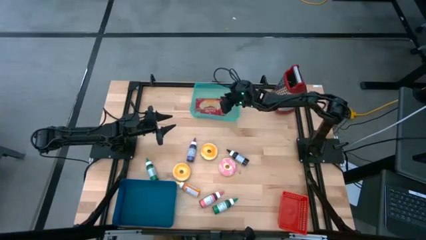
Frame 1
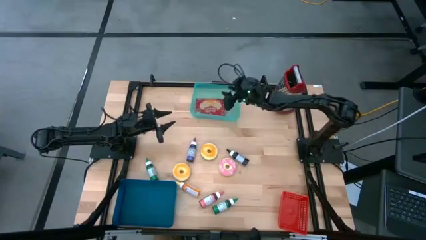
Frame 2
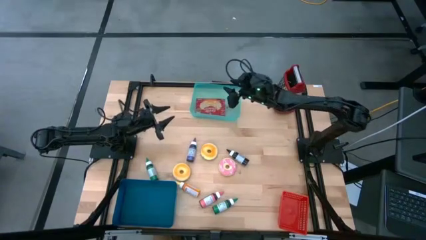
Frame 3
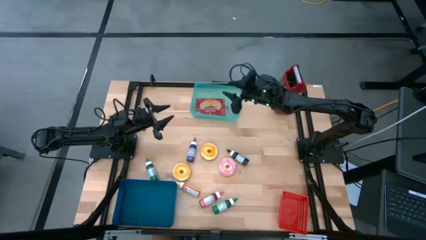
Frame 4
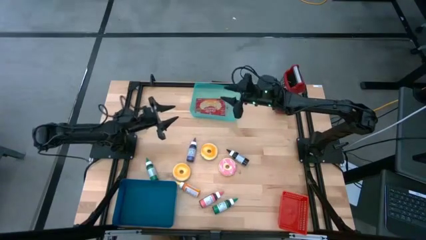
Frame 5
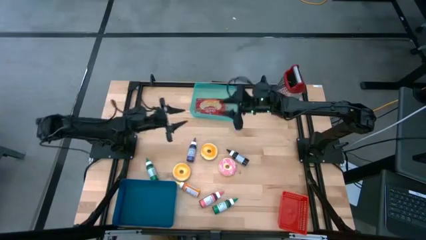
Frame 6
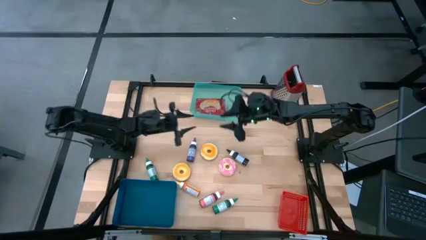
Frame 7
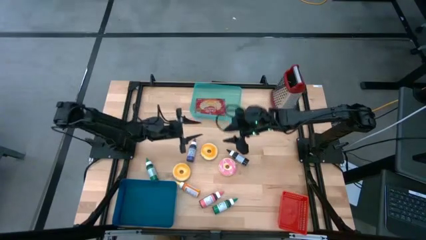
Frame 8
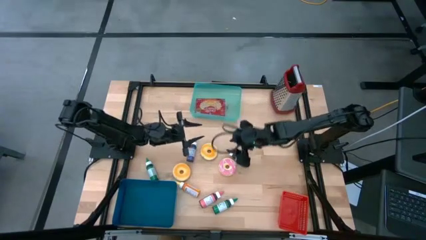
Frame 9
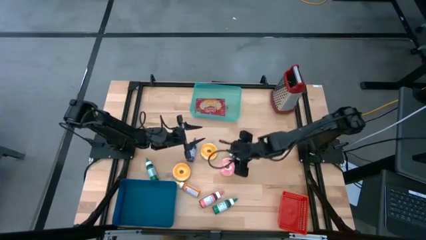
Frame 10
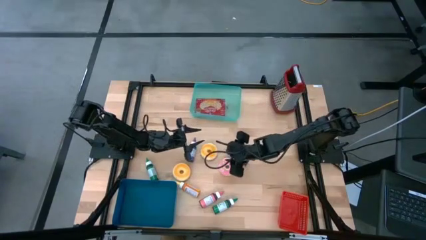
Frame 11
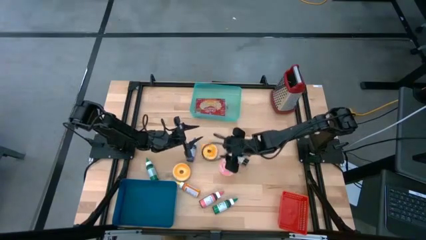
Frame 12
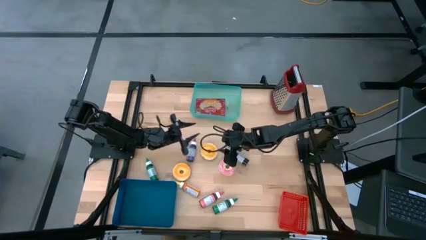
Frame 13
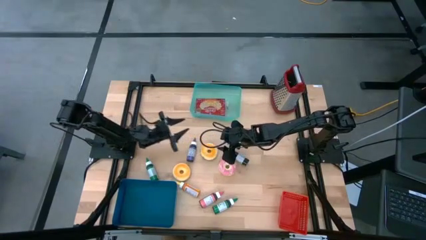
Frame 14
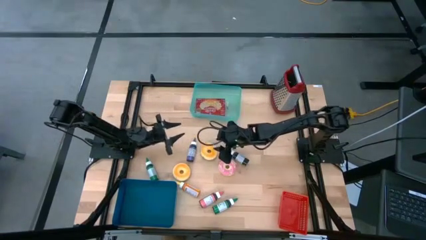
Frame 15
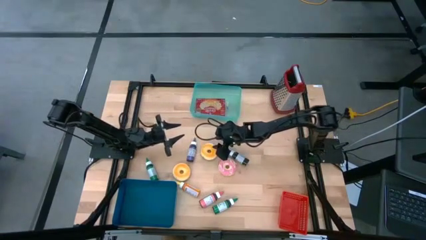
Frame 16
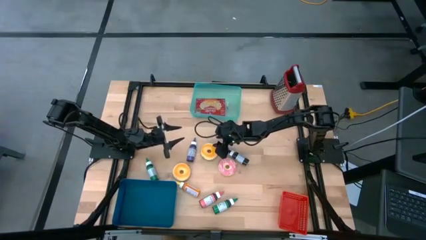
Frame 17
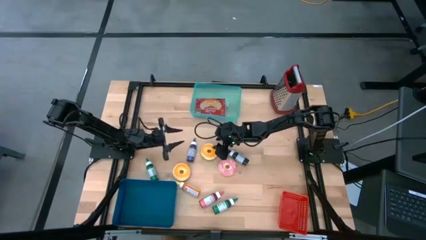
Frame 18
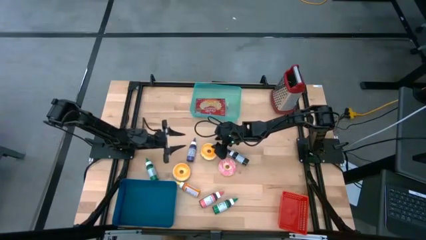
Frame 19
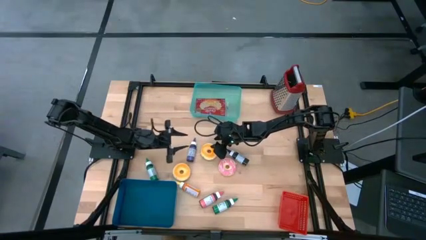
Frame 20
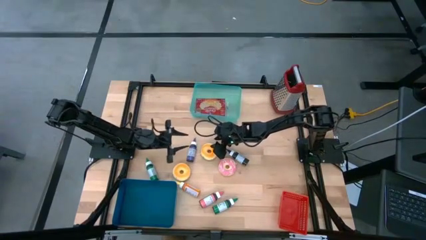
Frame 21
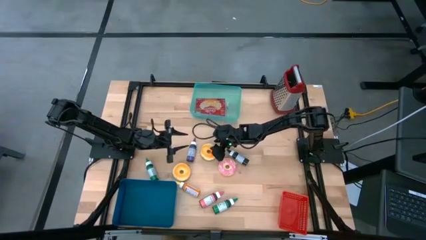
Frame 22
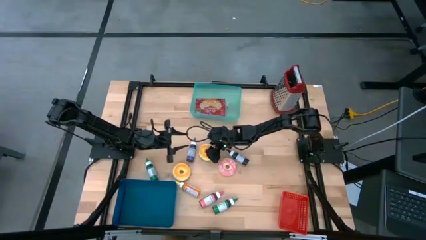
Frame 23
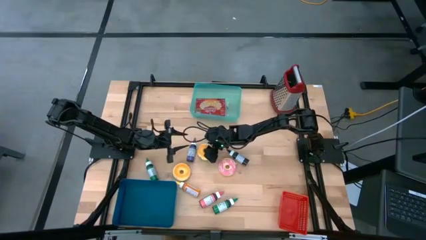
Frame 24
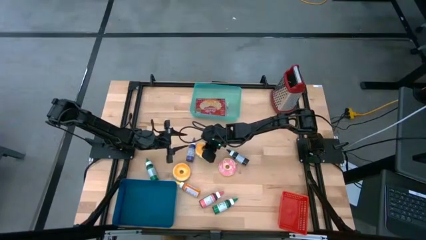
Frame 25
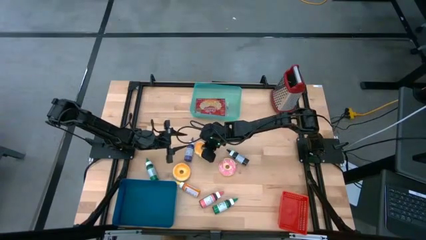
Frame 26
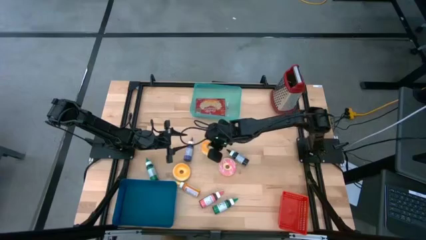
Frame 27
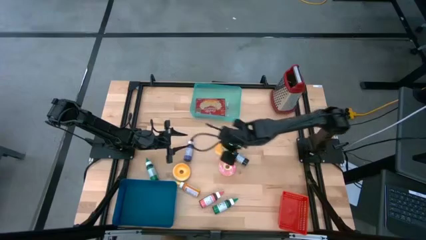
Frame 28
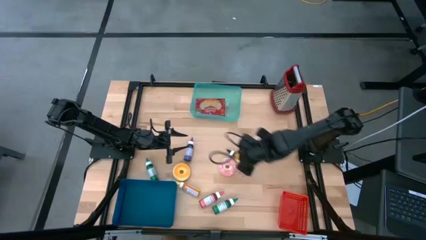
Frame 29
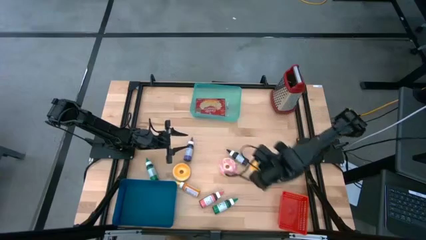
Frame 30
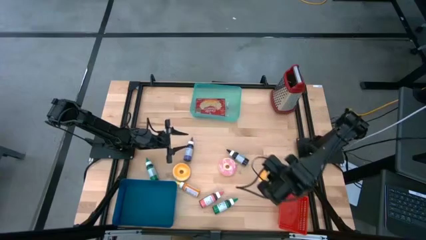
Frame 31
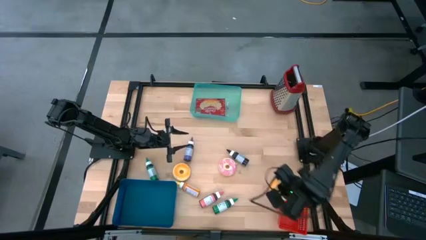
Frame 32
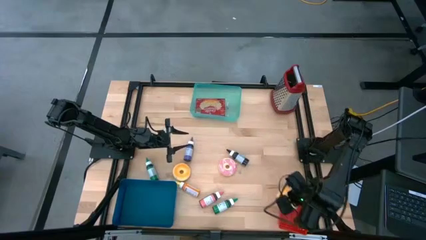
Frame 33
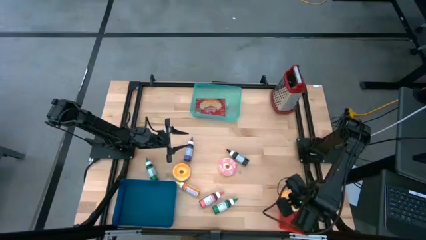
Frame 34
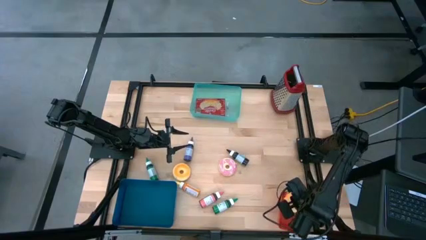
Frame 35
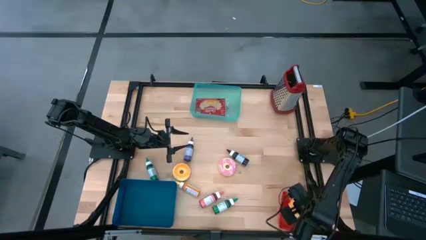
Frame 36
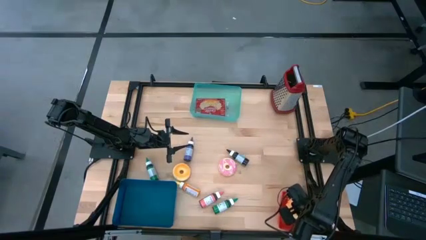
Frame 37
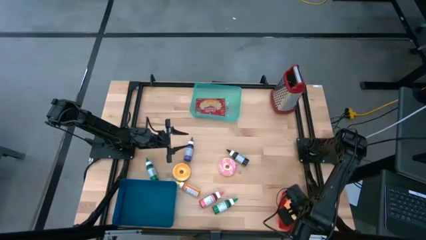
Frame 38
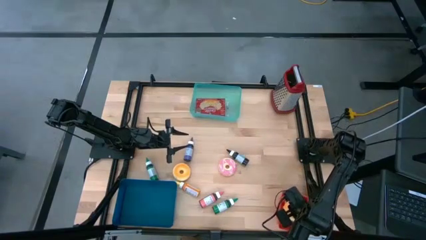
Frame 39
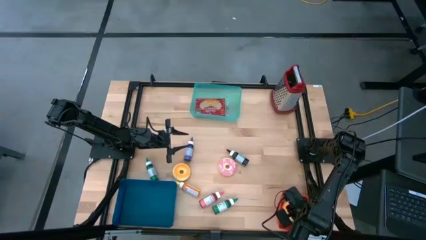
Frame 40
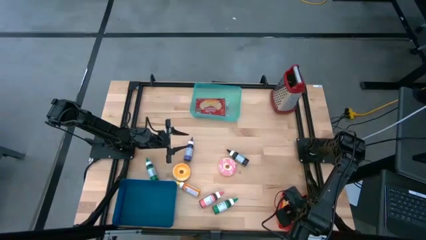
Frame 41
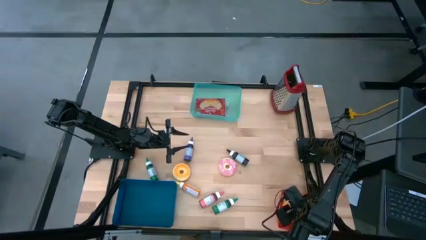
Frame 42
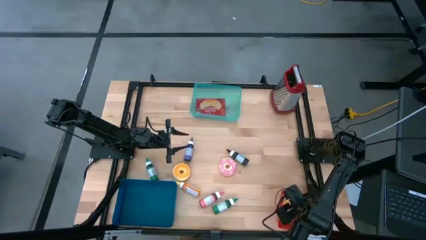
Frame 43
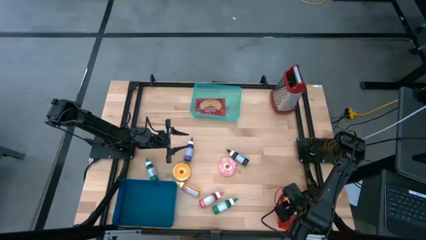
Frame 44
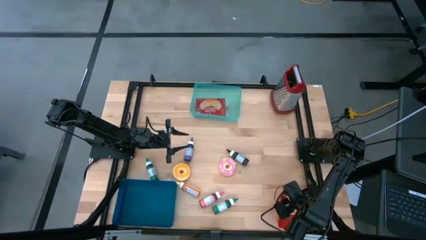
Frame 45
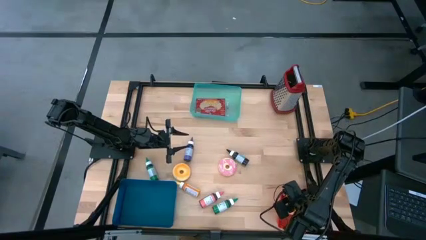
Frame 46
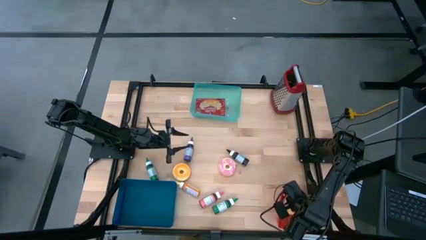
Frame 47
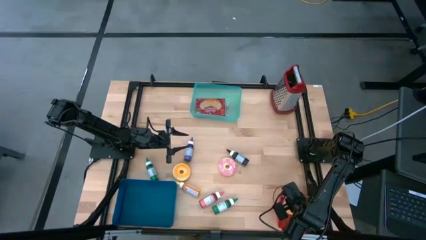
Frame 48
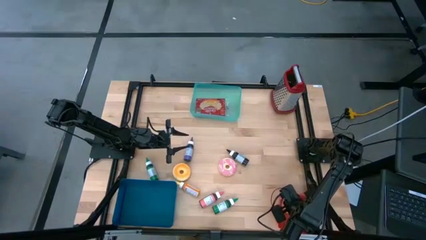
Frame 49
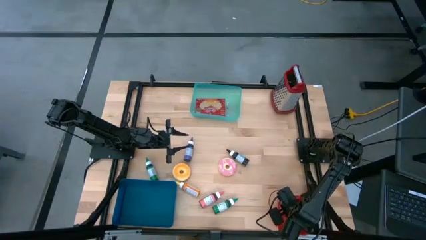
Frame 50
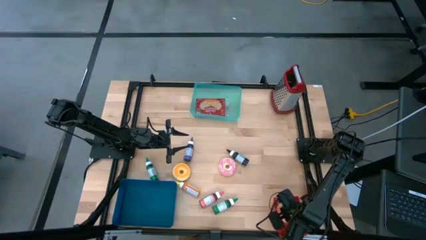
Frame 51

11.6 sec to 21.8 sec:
Put the blue donut into the red bin

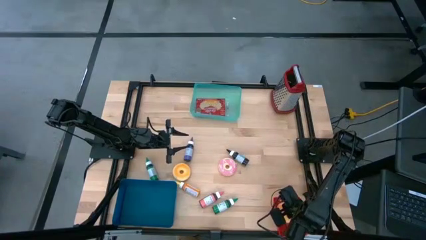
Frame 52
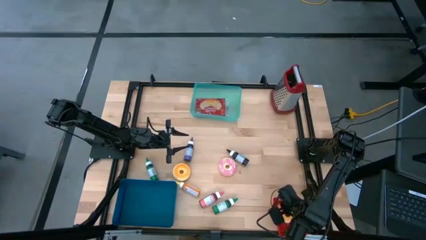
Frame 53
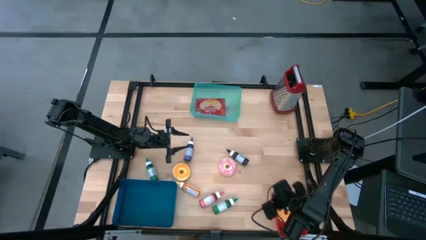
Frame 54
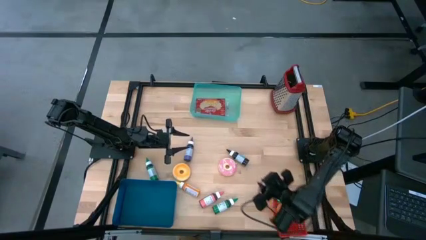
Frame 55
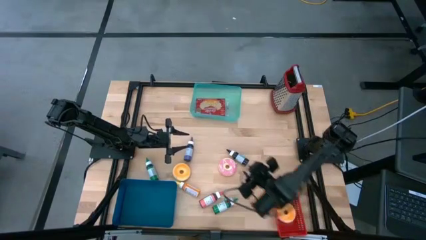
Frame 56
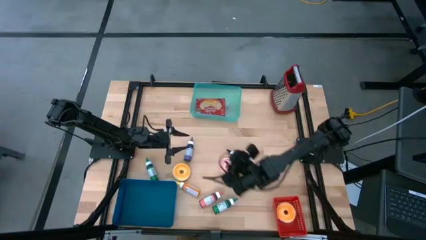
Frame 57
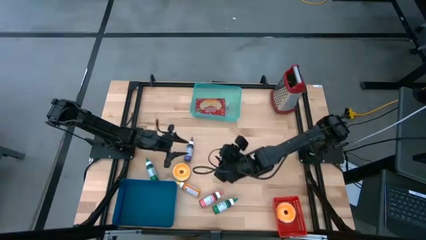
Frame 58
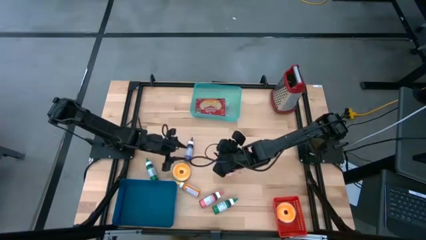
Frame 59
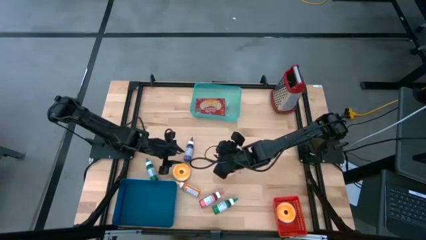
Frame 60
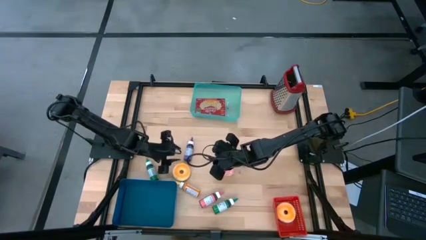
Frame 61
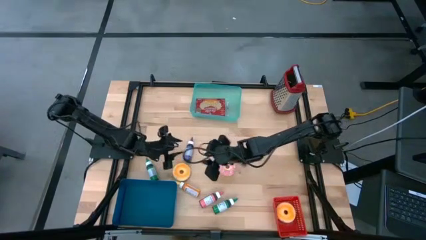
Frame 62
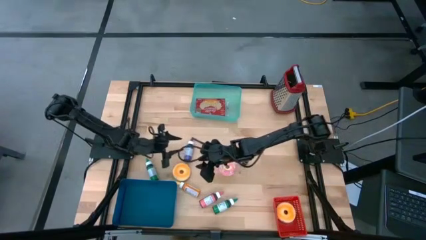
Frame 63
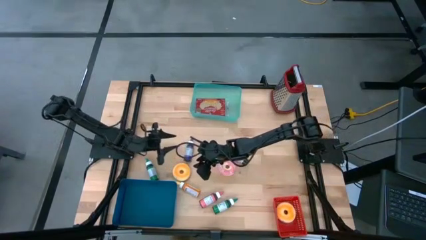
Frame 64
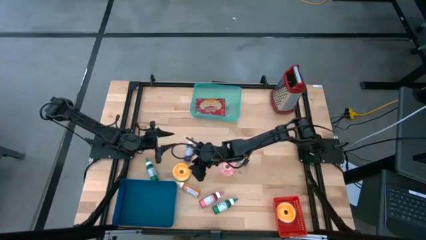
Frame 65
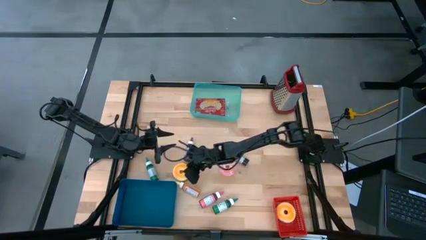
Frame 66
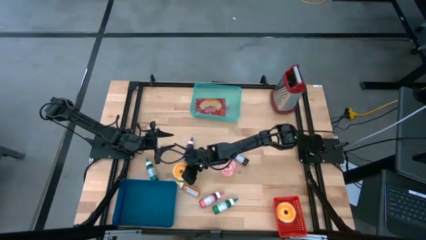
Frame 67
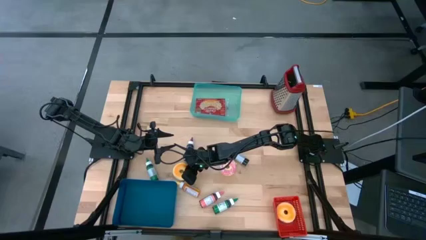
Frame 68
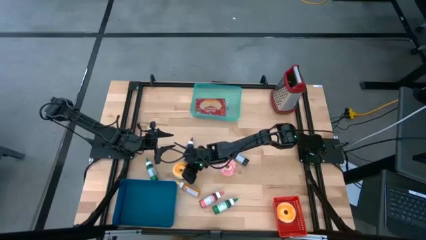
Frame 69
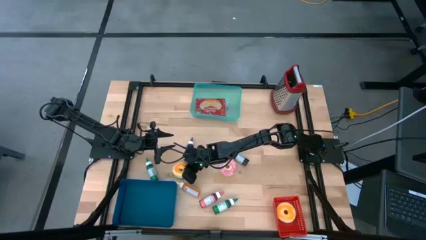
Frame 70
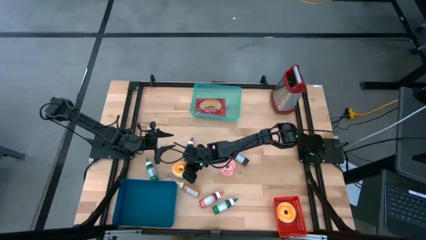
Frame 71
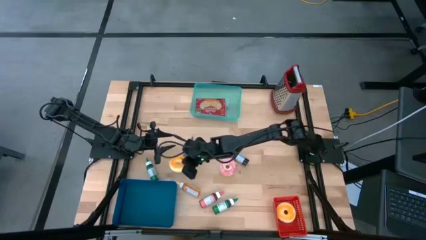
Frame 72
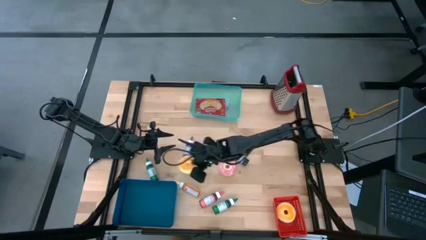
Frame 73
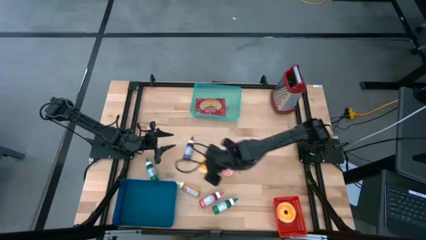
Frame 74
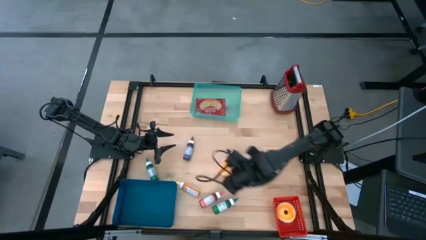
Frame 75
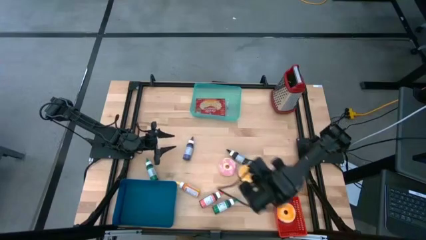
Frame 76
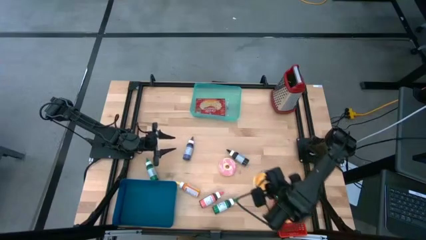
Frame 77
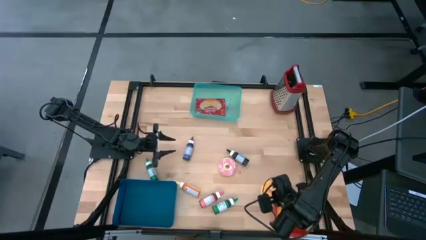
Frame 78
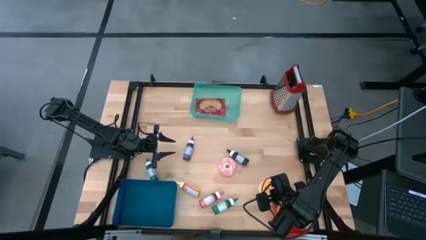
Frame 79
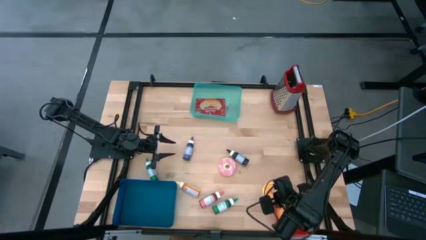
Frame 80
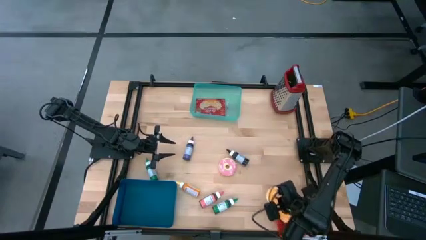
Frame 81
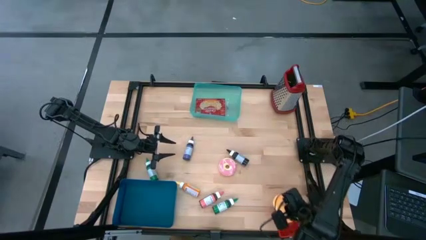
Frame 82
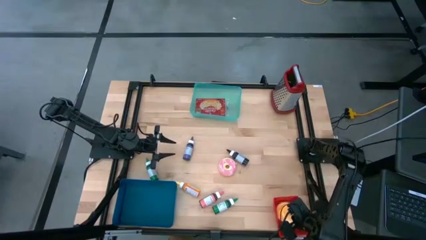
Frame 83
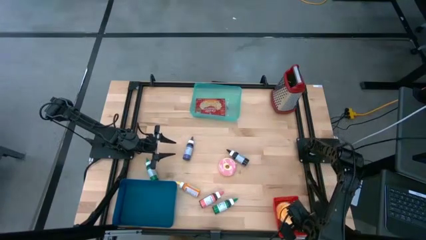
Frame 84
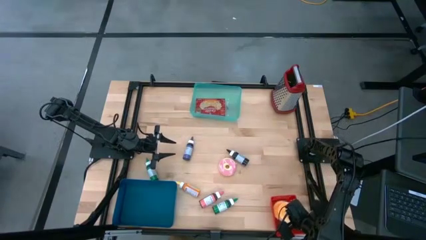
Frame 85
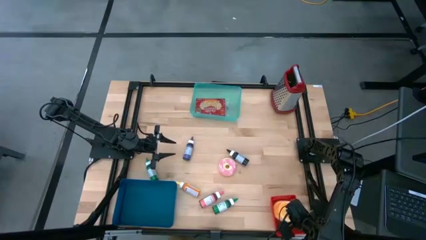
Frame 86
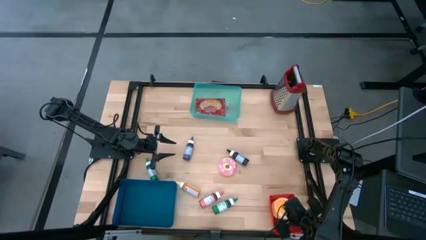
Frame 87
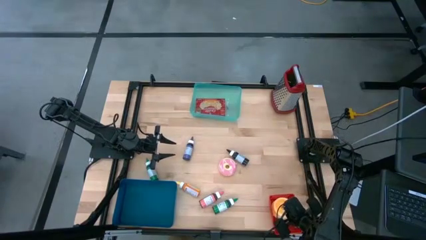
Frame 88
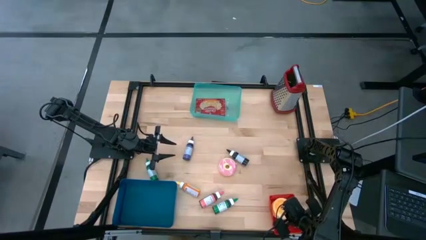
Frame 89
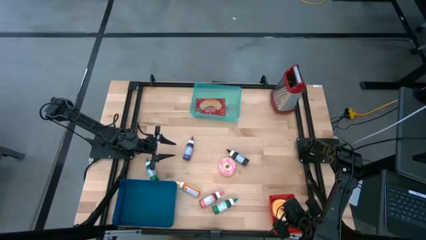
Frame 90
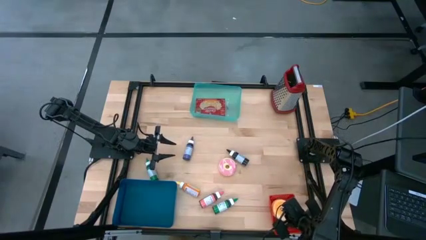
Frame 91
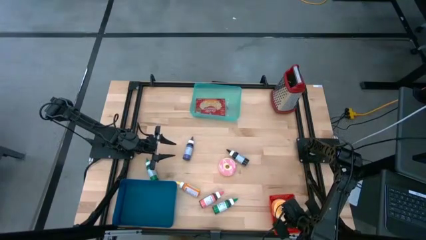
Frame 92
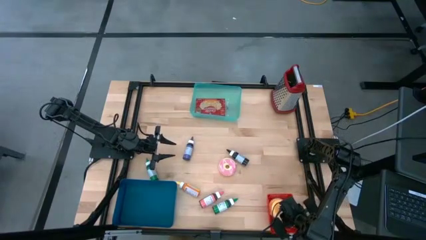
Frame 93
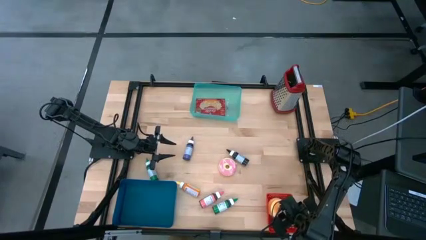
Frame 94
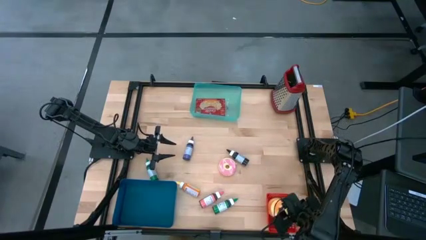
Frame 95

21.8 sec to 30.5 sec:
Put the dark brown donut into the red bin
